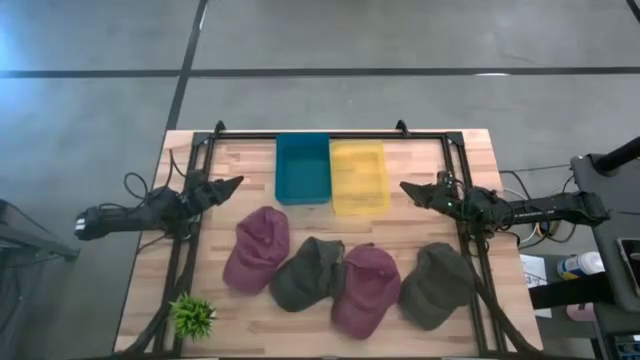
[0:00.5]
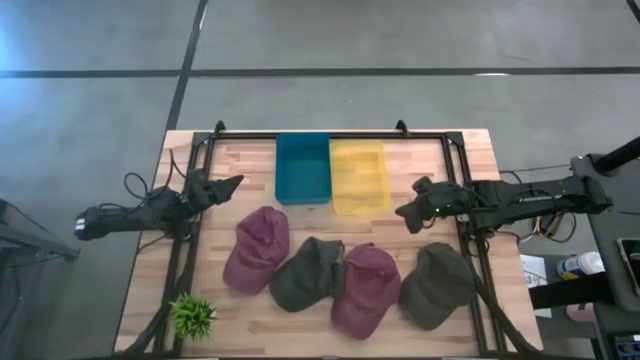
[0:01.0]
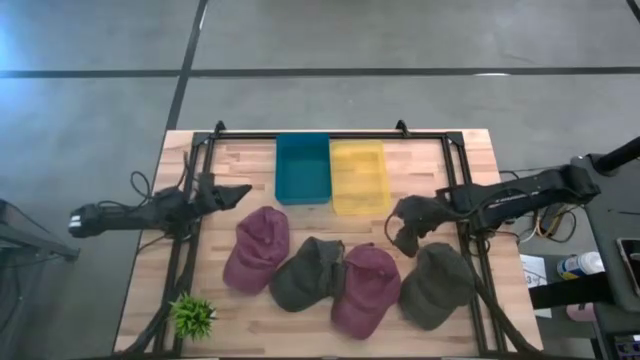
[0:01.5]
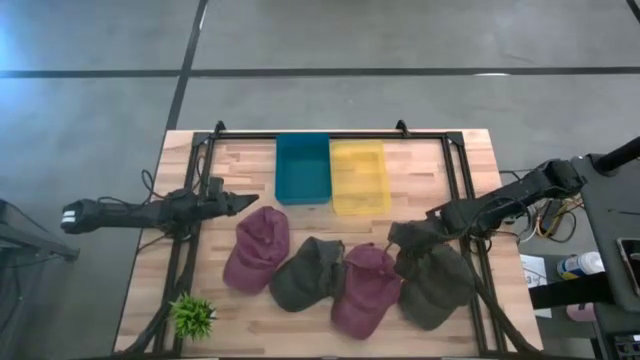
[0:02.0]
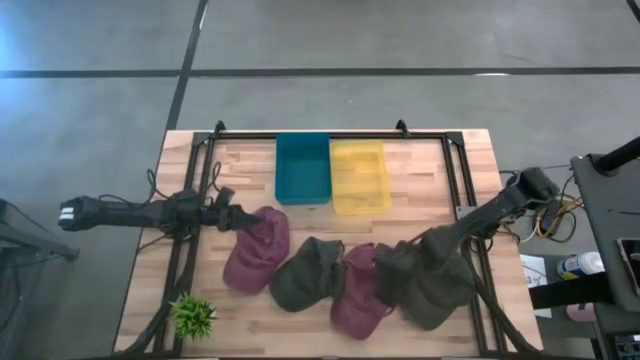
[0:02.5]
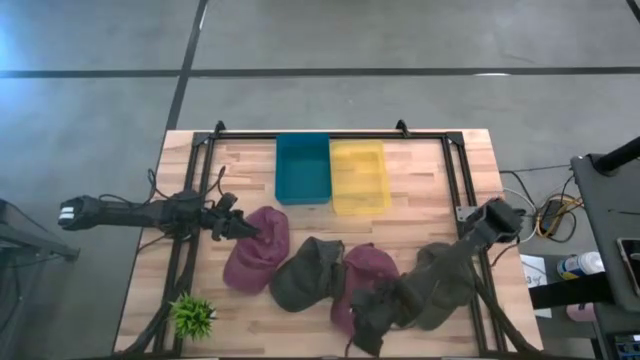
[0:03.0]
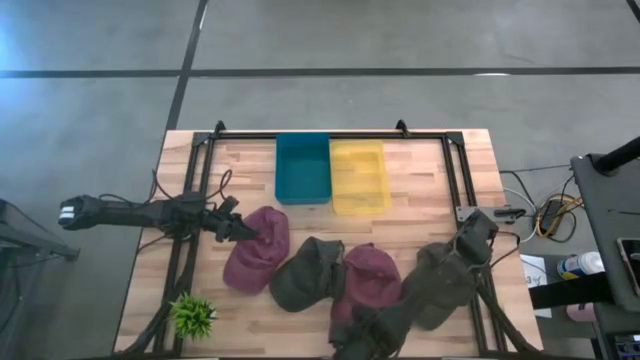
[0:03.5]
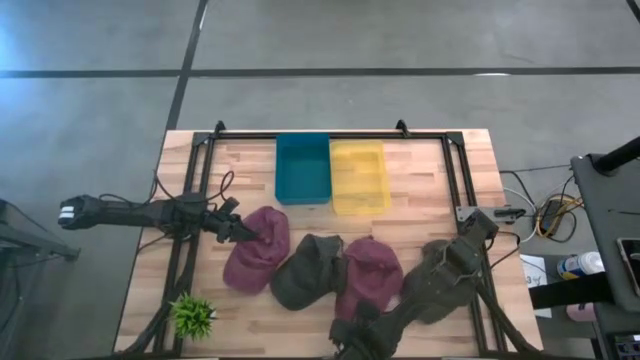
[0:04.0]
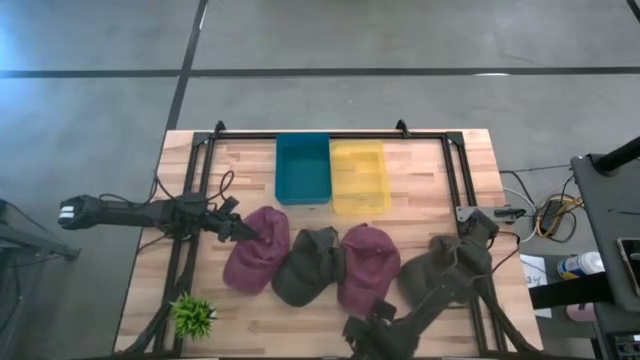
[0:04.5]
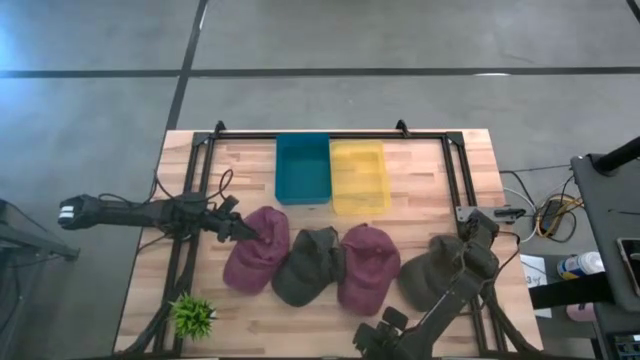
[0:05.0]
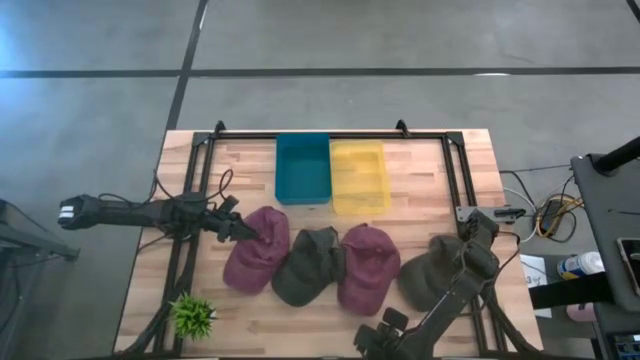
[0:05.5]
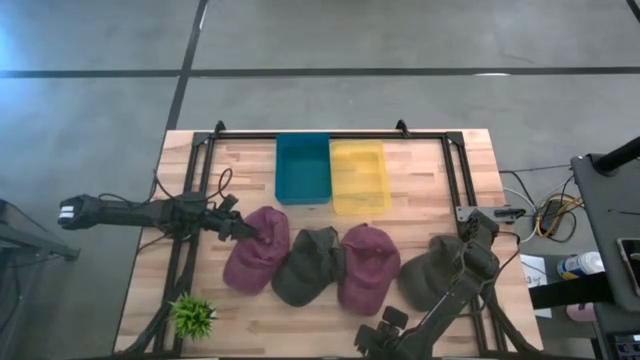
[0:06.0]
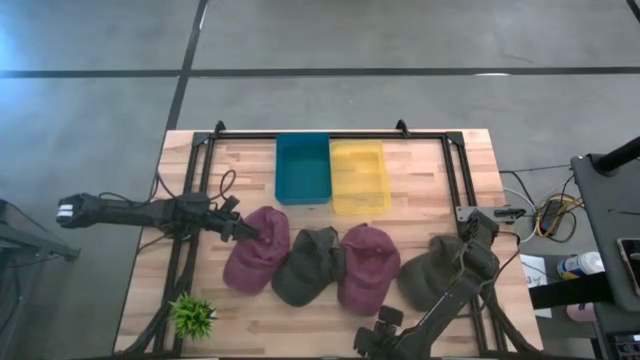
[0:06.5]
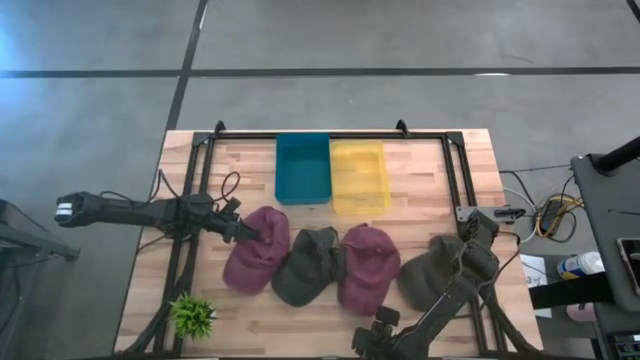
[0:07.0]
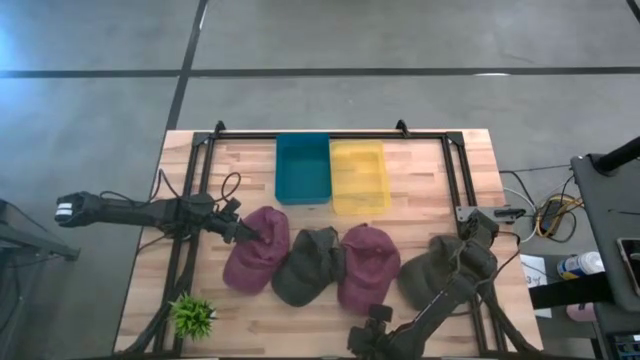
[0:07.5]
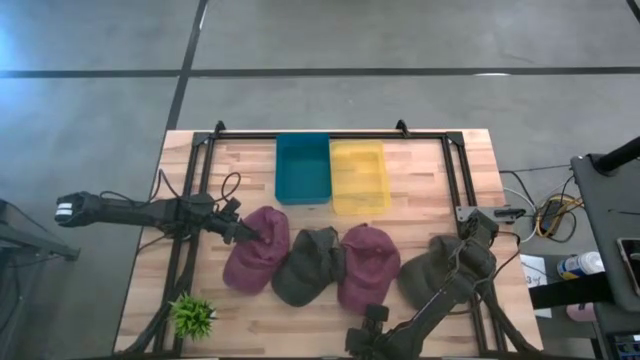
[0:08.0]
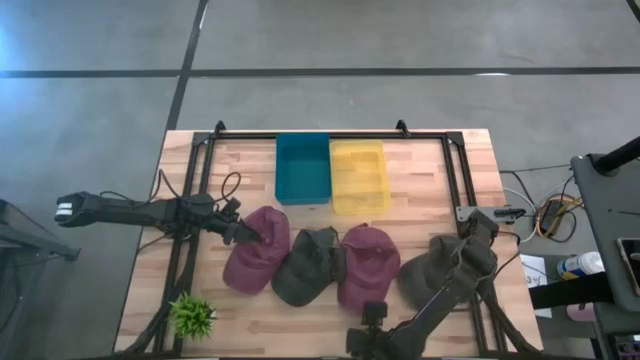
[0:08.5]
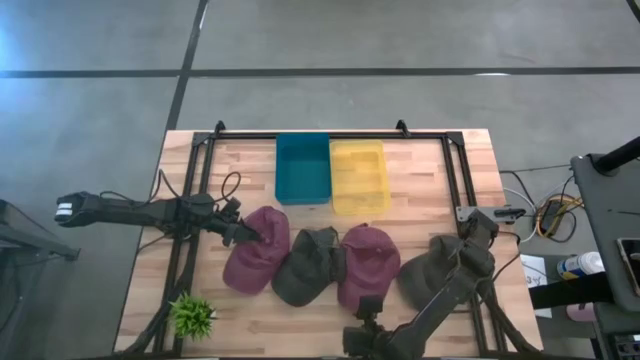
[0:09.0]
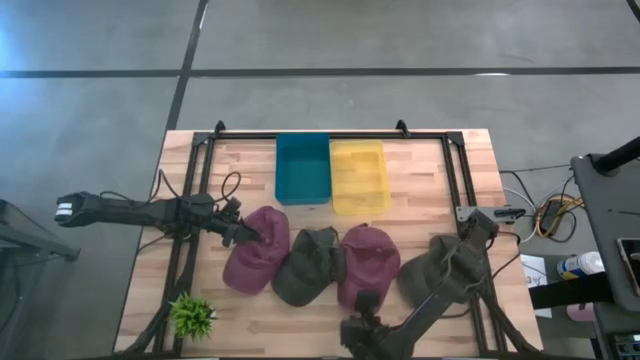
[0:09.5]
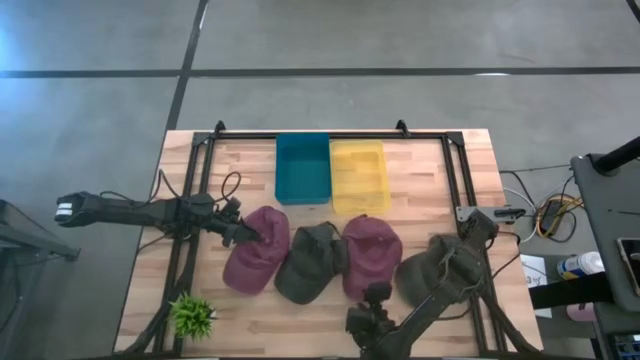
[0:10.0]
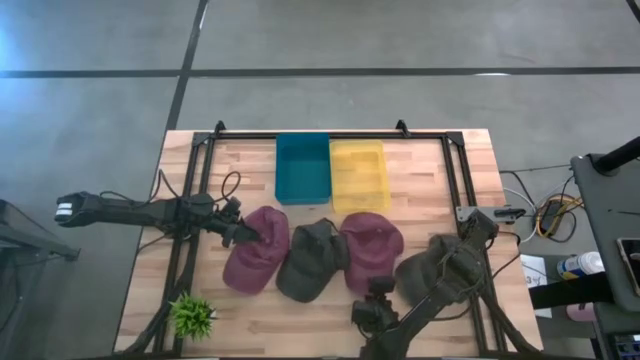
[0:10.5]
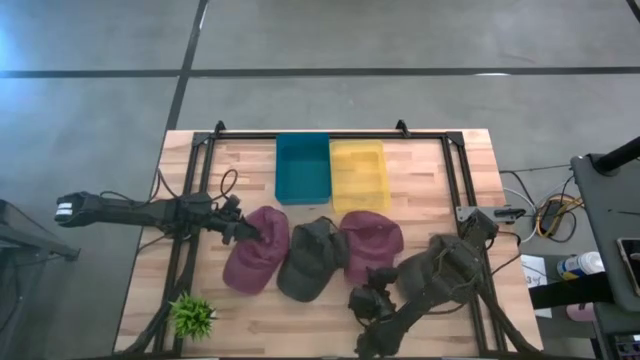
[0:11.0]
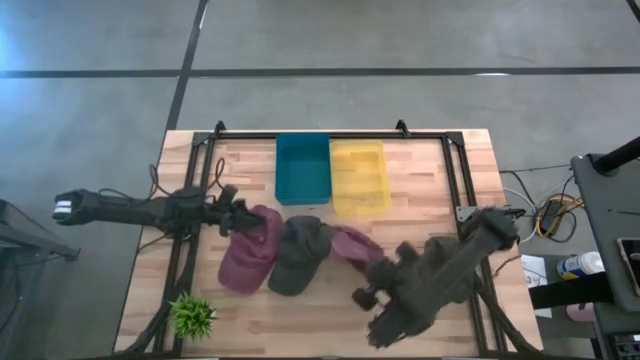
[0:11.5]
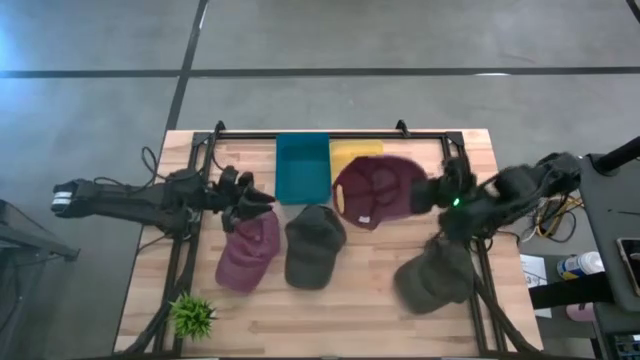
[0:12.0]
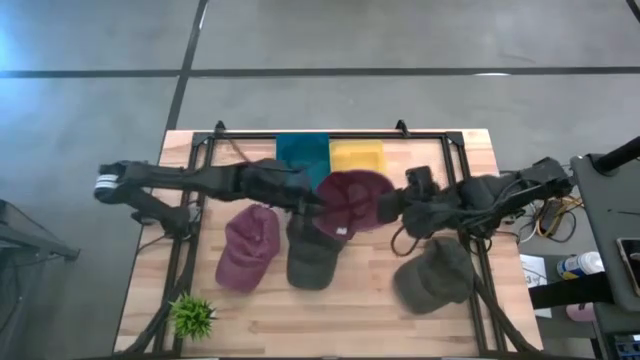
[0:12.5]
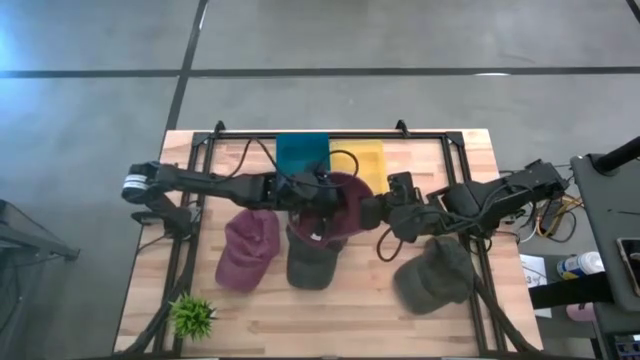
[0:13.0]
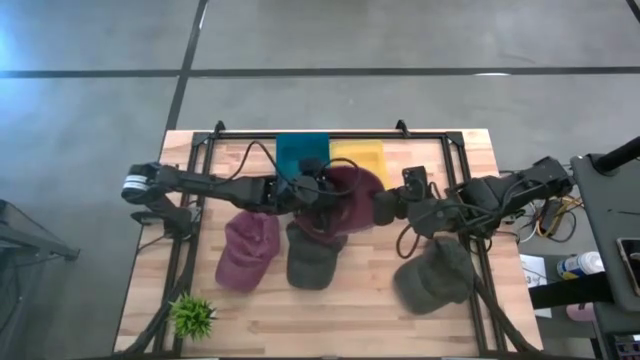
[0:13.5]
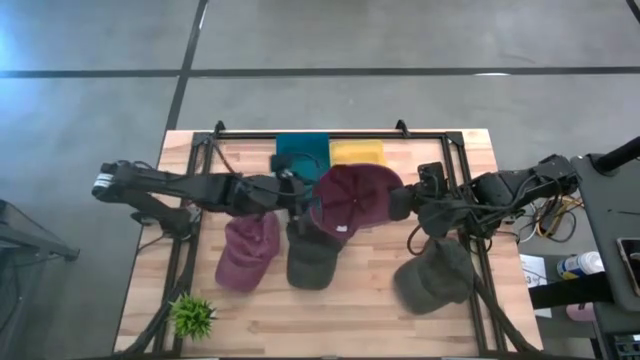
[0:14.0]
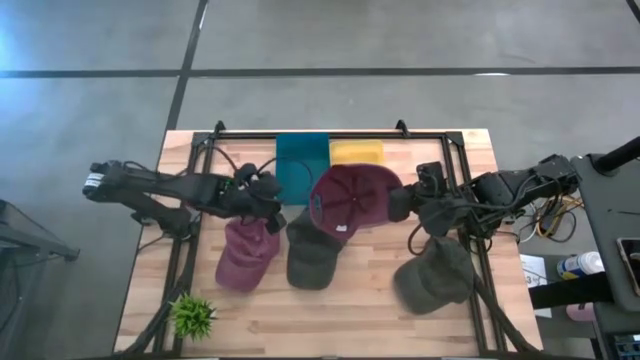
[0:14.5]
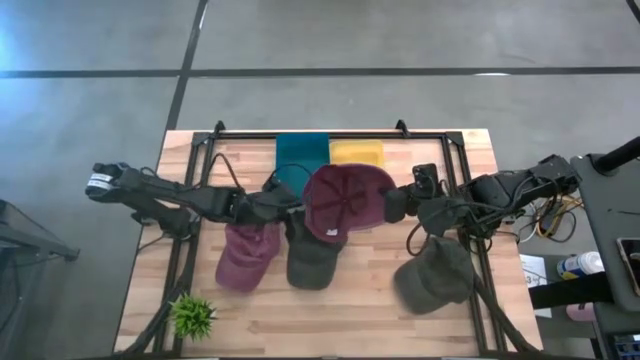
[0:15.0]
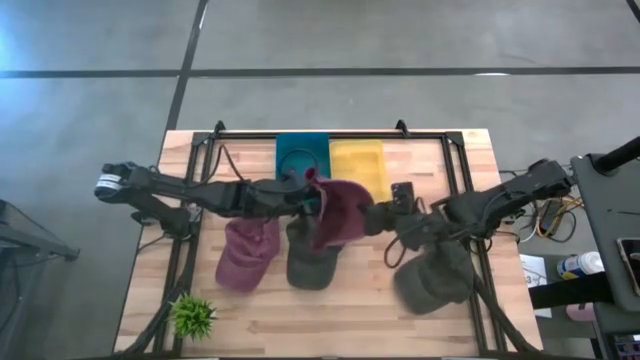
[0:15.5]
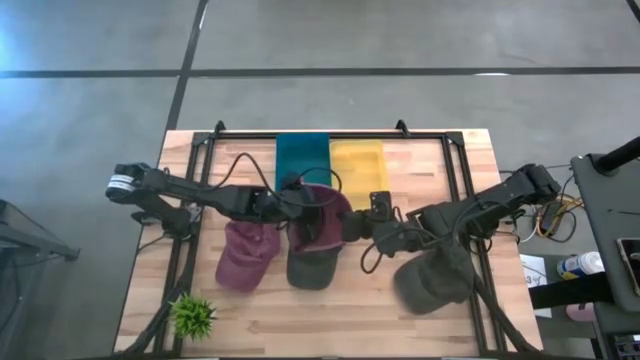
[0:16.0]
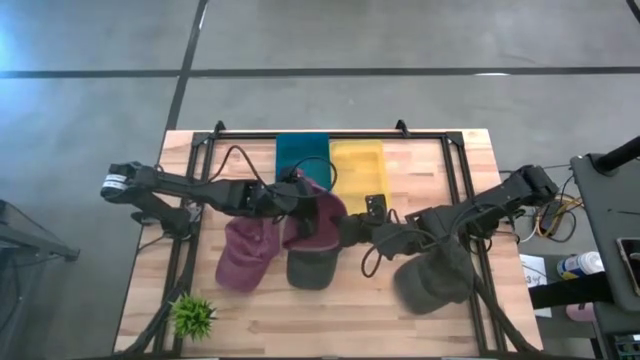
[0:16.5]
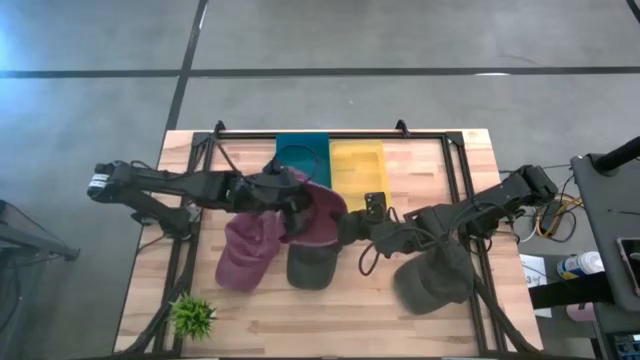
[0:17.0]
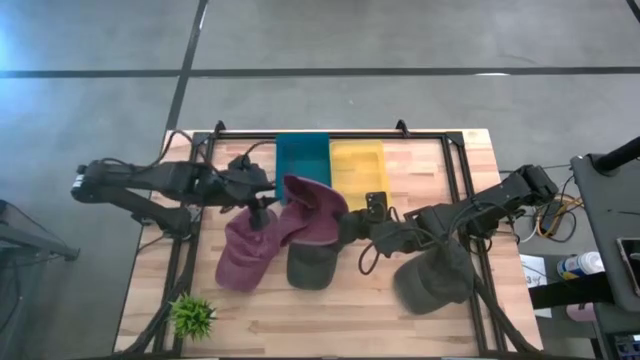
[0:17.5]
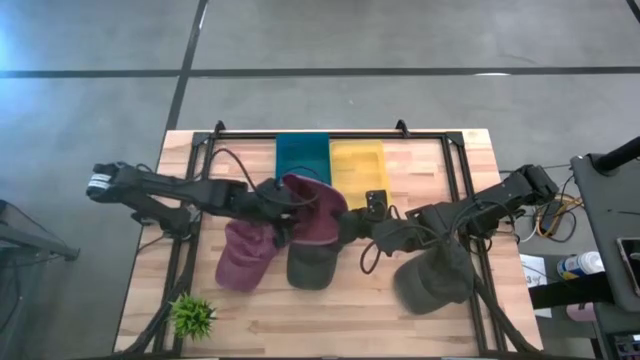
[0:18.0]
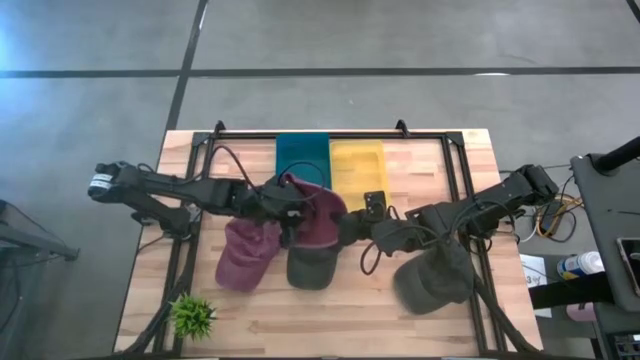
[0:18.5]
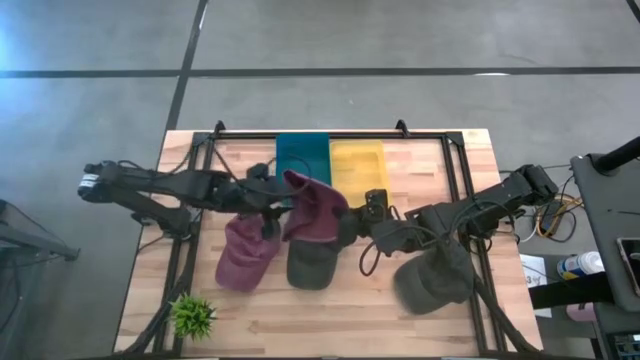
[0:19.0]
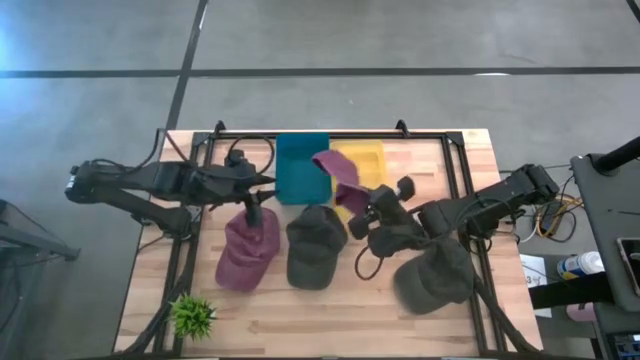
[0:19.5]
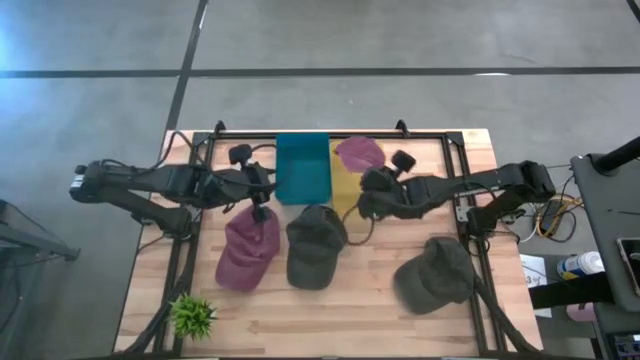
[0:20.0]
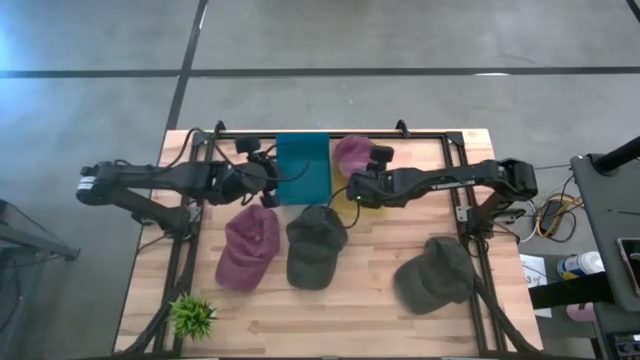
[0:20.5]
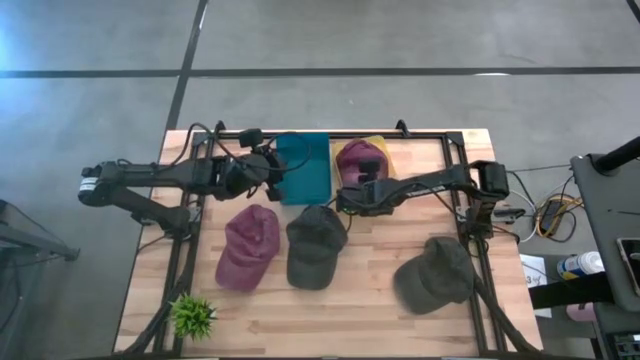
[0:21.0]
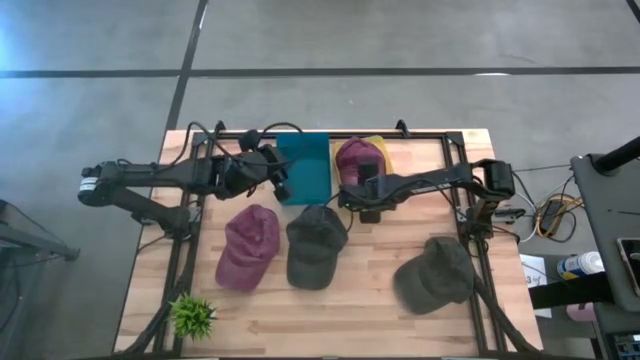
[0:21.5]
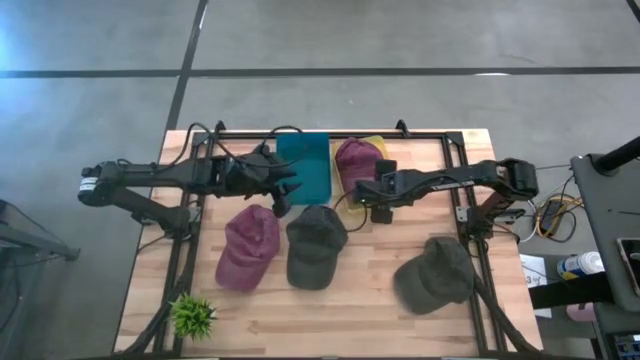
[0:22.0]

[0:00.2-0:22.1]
Task: Pick & Place hat
Put the right red cap into the yellow bin
